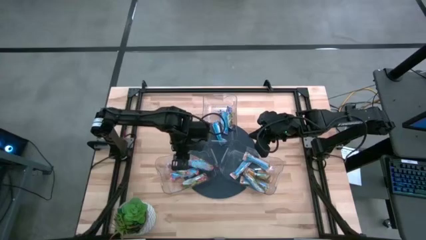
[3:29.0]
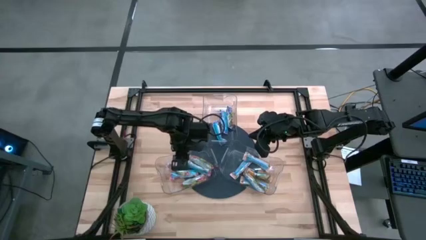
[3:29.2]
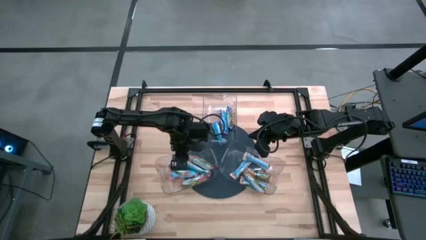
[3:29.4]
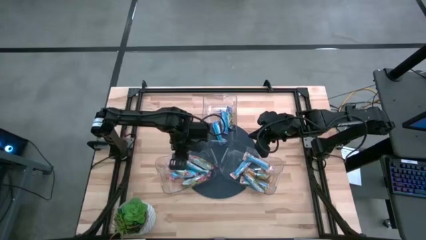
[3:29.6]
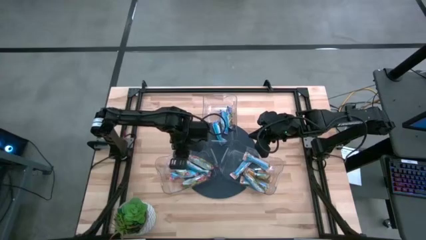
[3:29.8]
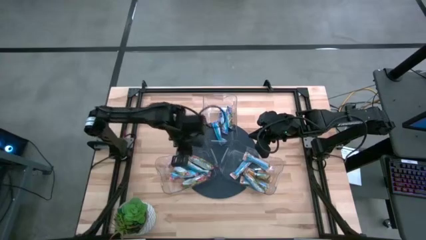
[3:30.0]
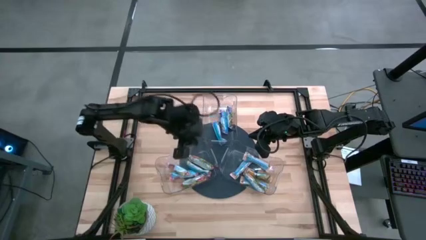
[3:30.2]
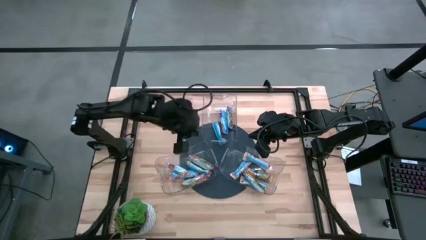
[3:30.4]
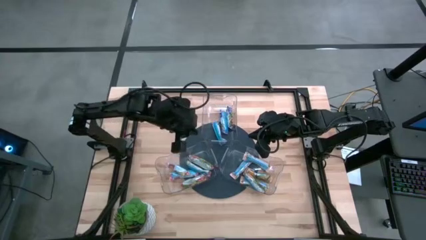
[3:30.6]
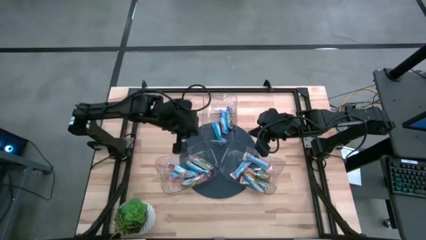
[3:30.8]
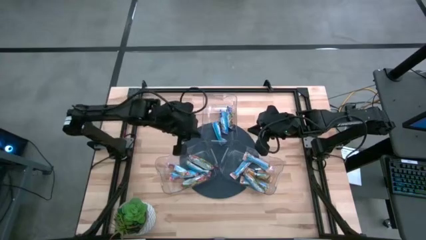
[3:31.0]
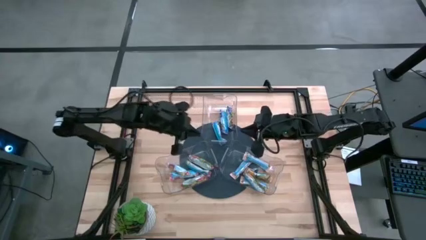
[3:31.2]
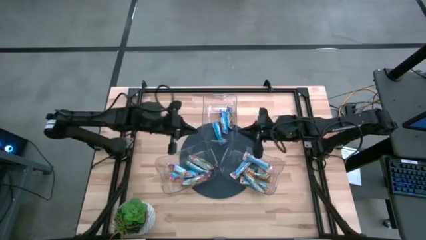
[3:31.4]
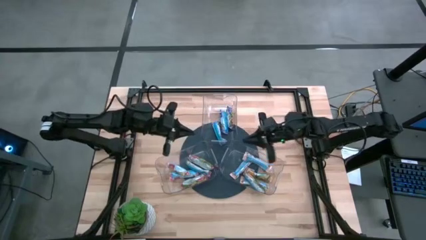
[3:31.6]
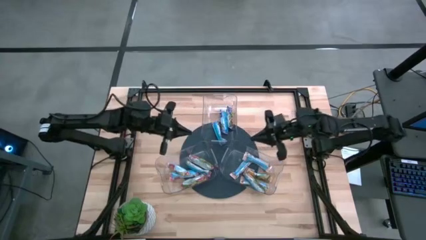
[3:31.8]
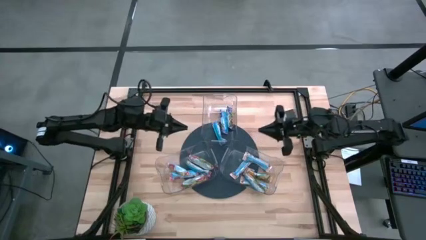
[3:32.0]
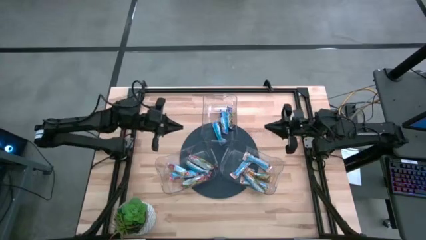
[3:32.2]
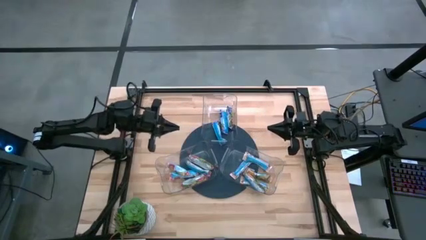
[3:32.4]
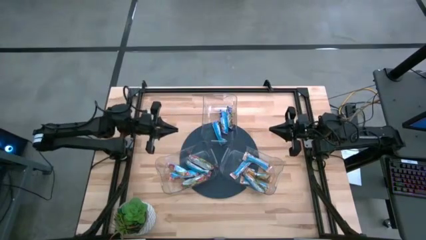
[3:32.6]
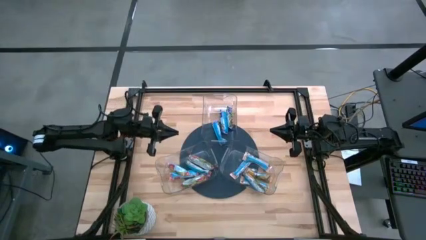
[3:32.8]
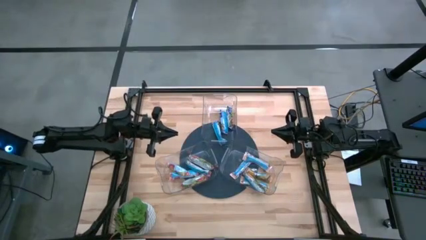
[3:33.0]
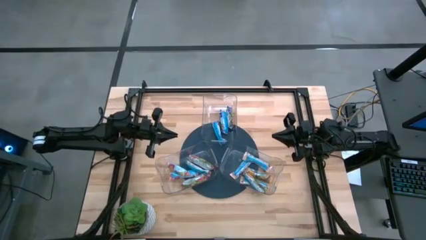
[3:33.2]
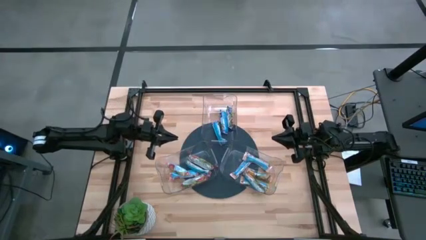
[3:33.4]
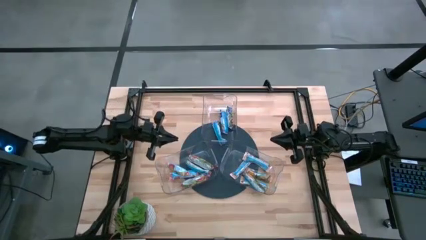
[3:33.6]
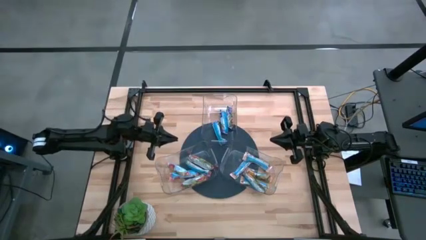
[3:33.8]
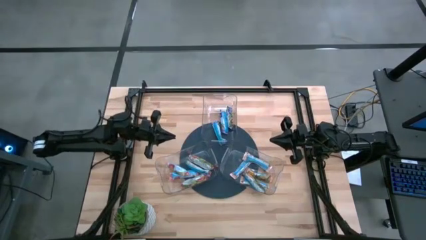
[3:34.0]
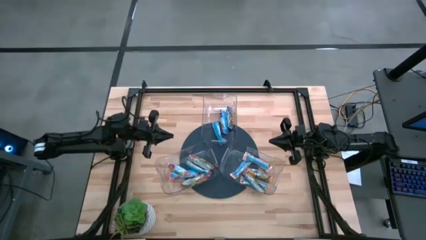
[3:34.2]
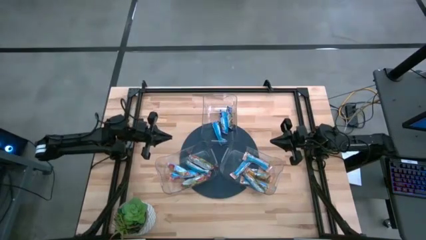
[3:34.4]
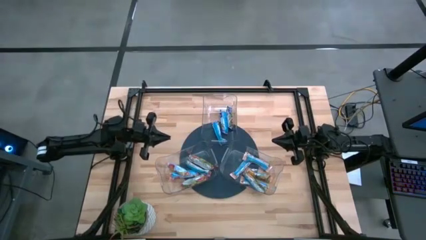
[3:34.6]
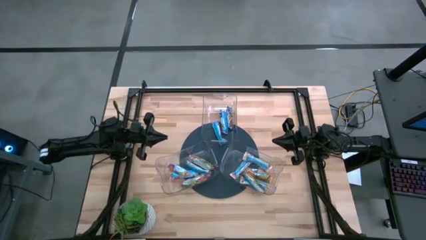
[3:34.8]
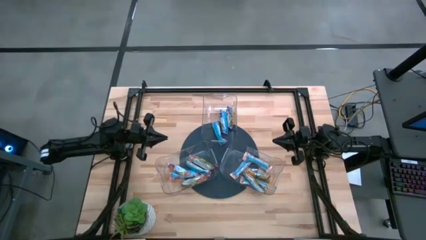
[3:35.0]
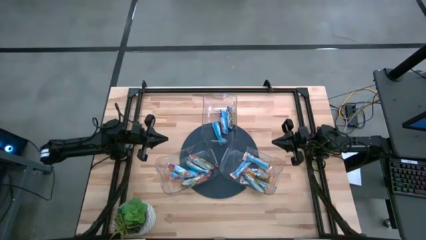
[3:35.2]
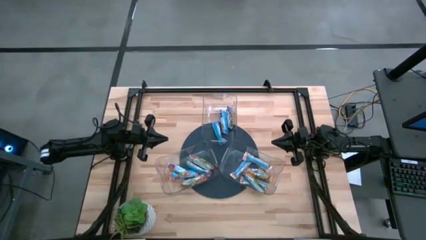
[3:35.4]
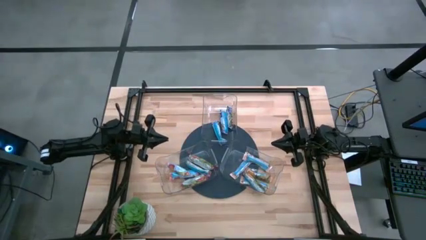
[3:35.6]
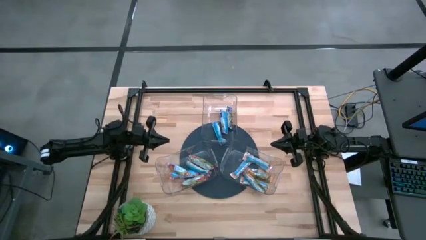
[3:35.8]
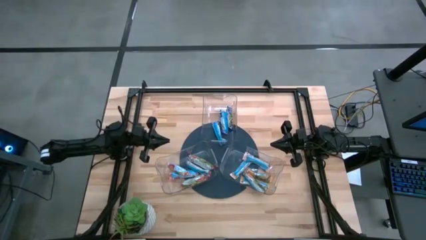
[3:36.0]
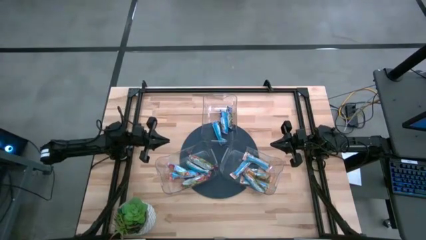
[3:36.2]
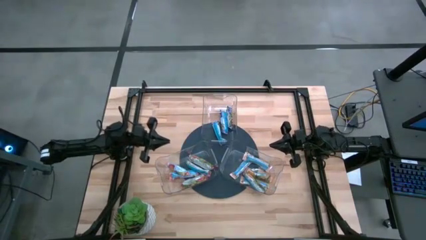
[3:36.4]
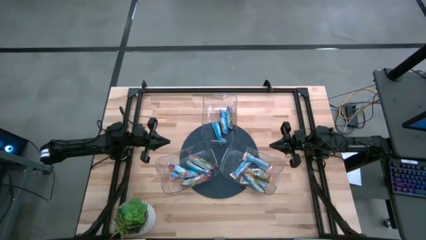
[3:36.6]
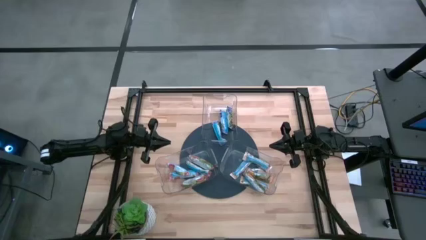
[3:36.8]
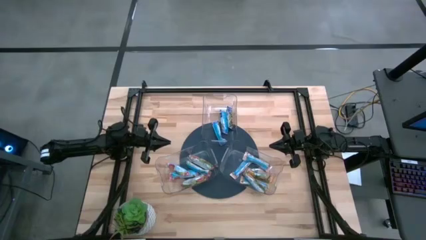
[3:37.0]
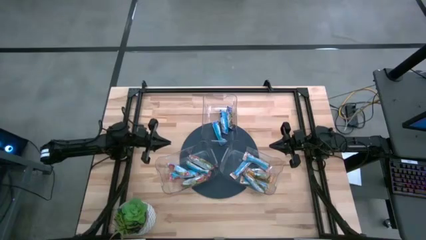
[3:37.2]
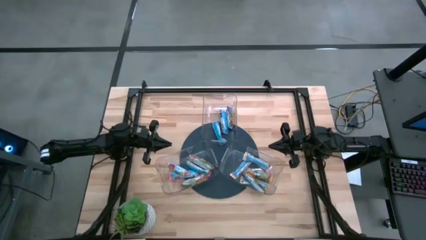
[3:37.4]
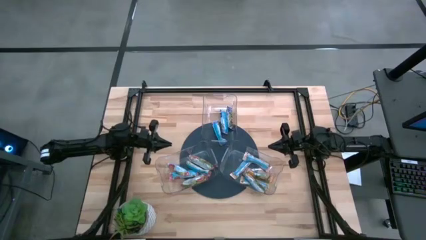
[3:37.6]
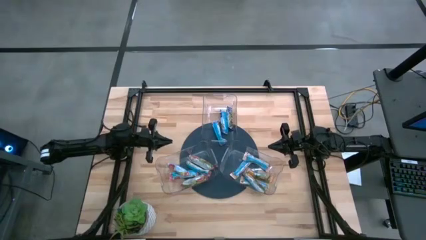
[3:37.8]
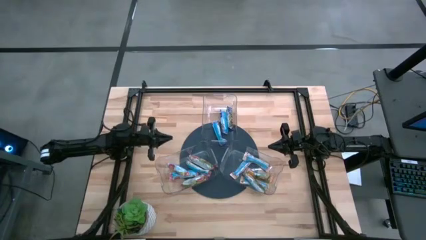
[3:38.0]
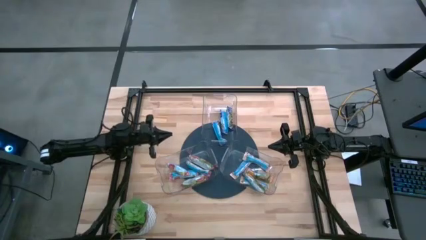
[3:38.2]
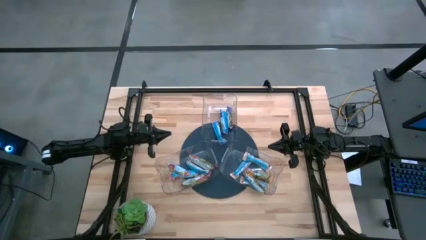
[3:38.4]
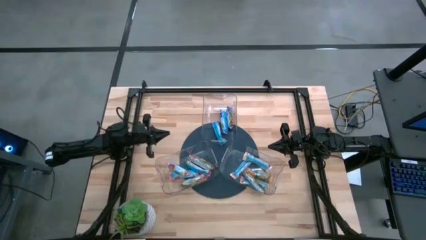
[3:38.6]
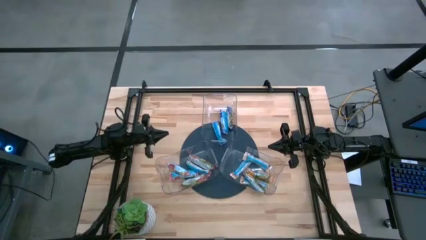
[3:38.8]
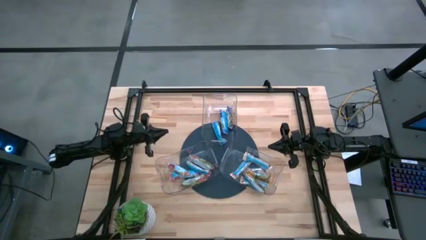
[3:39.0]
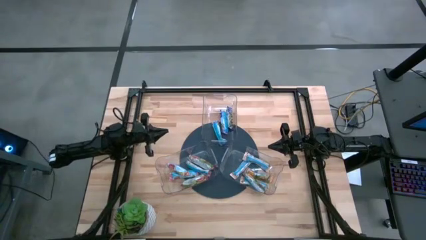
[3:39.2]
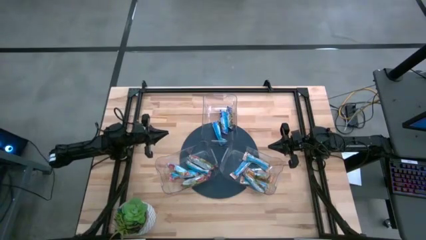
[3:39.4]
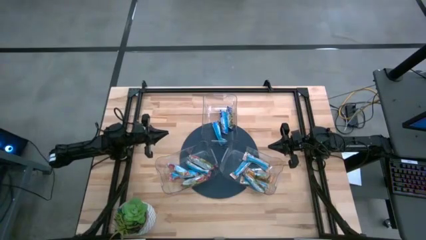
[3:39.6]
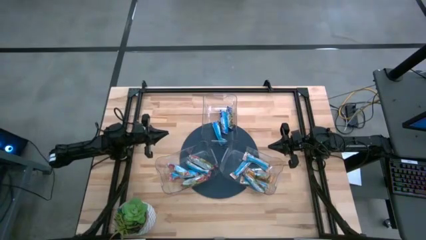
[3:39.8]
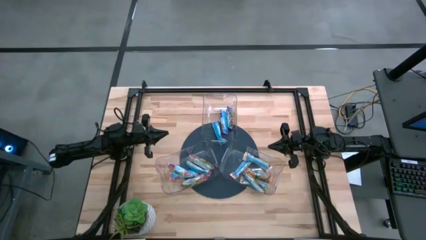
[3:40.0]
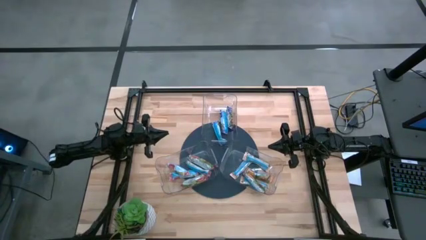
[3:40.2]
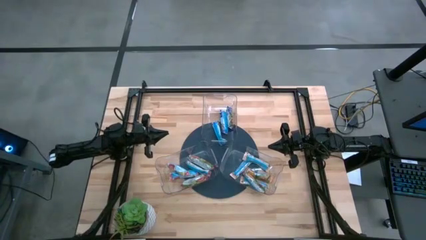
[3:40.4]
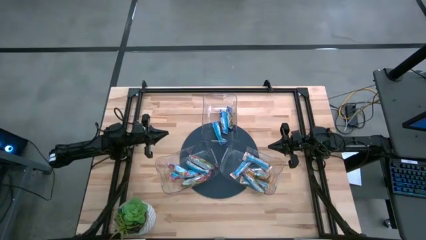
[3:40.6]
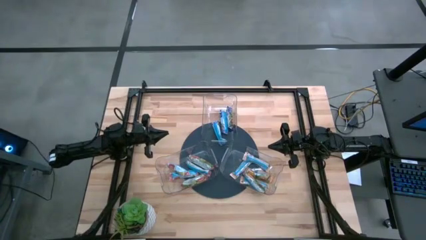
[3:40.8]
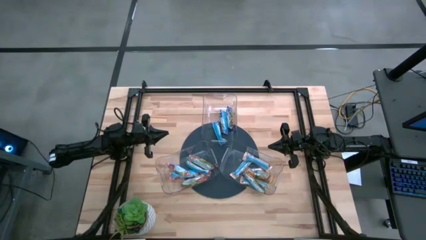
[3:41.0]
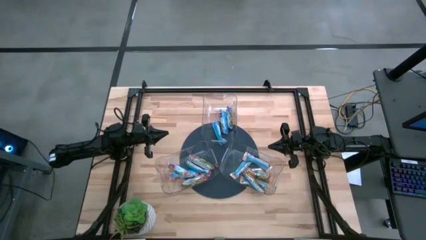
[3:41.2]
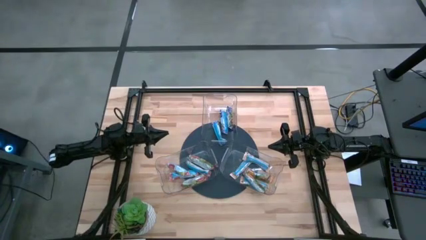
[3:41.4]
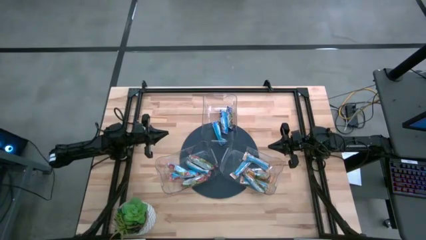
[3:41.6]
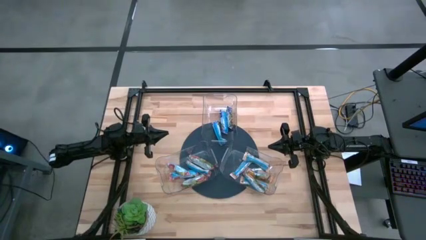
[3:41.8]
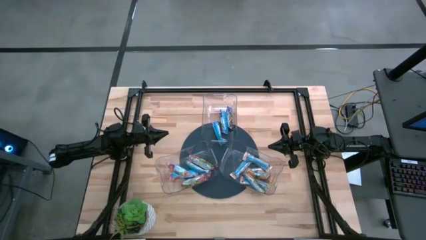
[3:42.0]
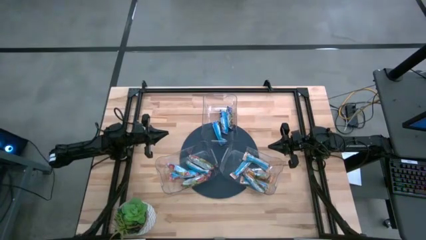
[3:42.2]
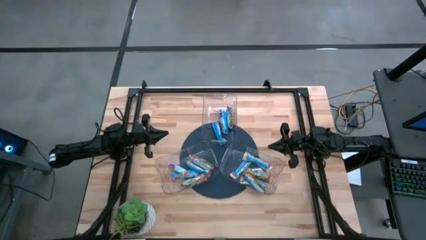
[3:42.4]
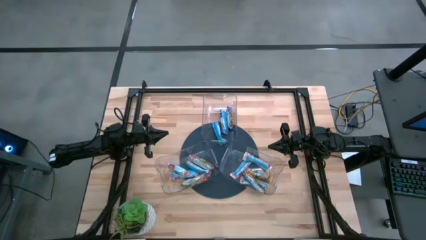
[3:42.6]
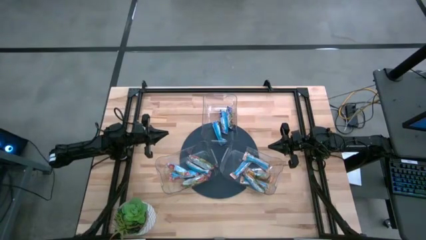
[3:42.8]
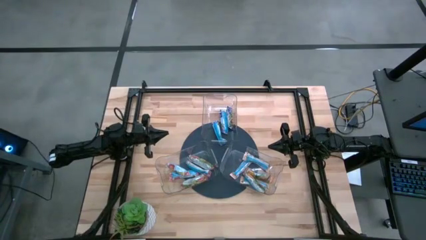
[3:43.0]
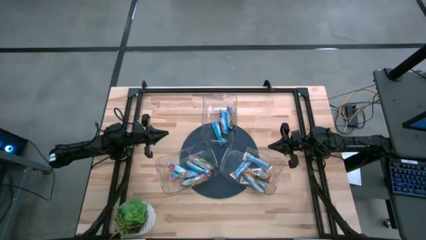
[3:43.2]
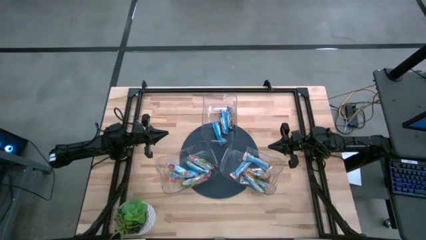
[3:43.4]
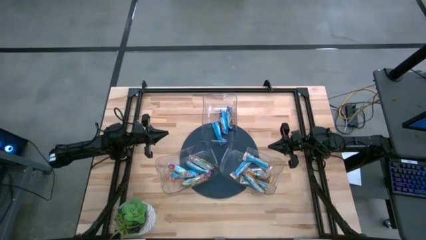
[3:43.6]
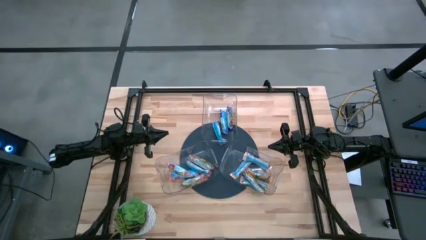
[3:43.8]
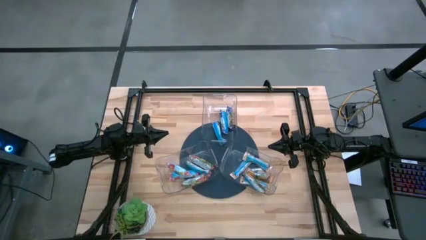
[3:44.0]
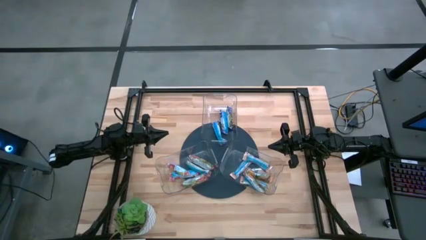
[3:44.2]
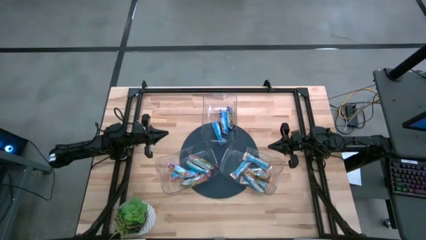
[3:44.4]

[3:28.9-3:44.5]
Task: Pick and place Granola Bars by type
Return to Home Position

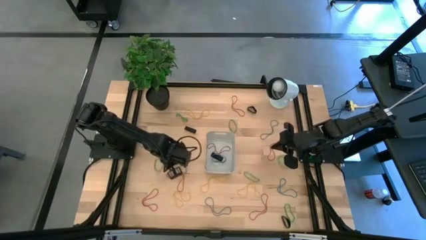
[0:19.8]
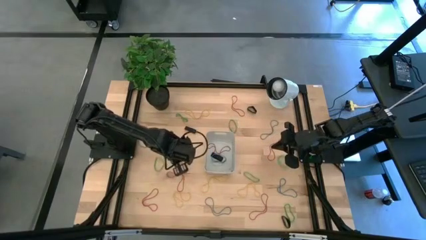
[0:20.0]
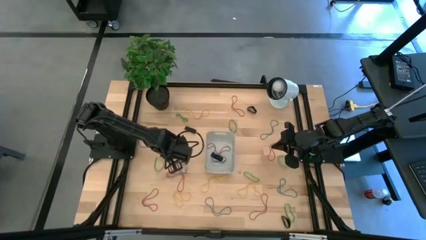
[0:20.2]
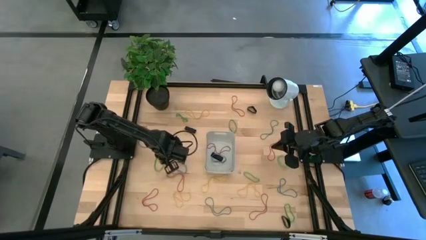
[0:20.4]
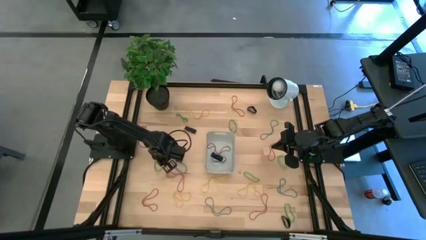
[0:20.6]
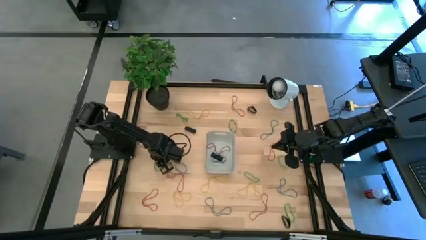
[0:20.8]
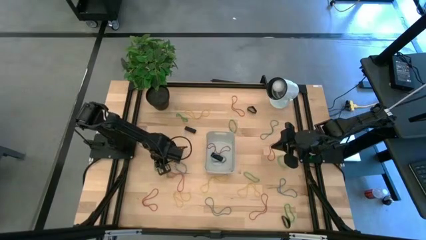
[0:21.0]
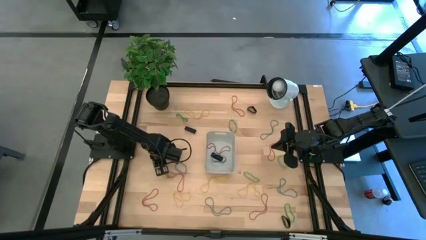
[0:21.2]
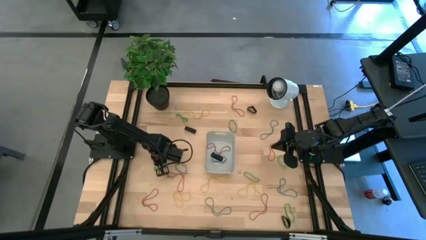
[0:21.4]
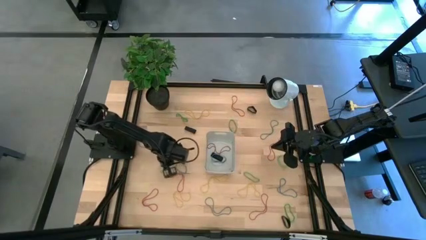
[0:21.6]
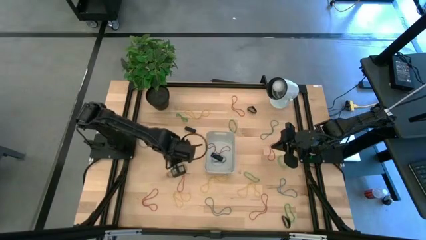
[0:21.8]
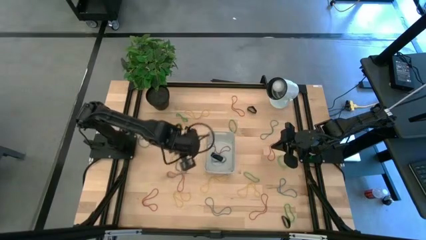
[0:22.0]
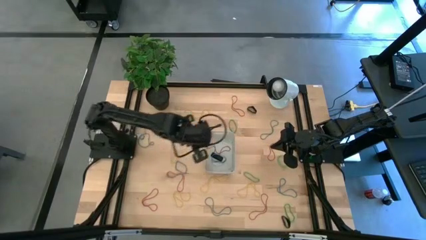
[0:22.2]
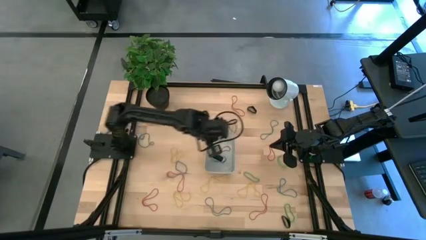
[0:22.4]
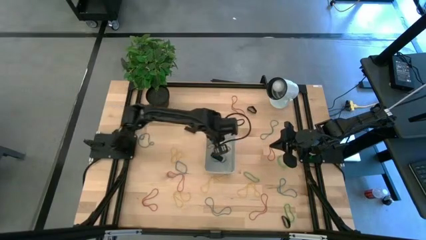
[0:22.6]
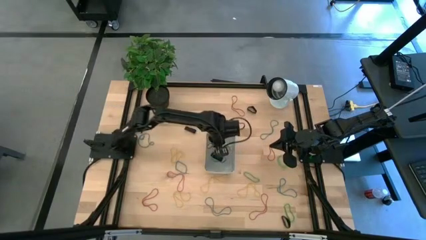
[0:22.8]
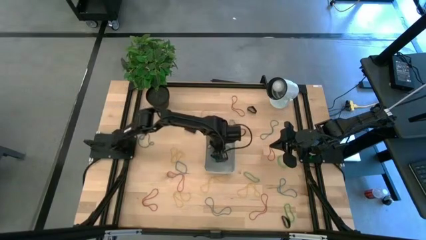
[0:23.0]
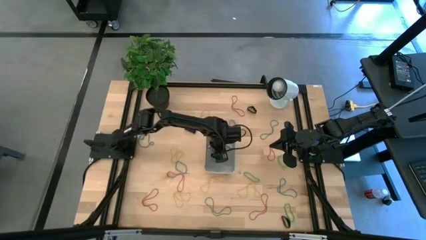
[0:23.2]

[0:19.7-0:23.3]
Task: Pick and place rubber bands into bin
Put the green rubber band into the gray bin
